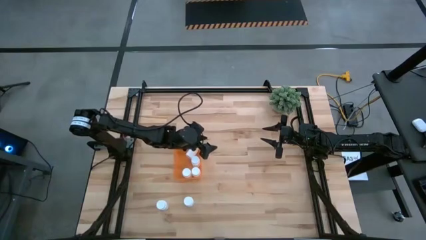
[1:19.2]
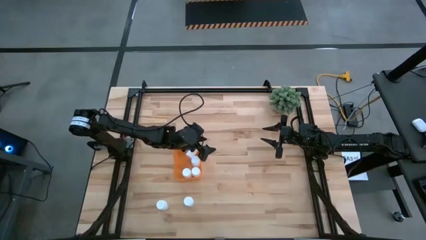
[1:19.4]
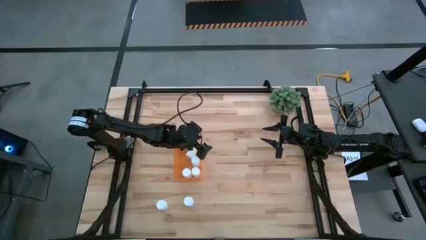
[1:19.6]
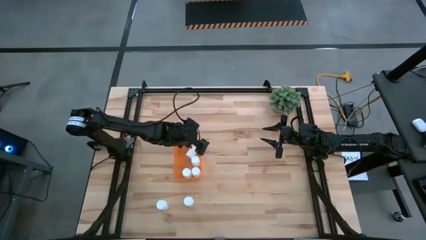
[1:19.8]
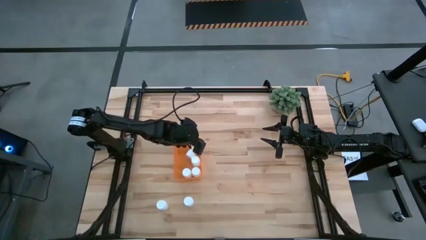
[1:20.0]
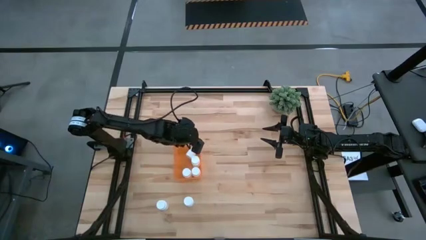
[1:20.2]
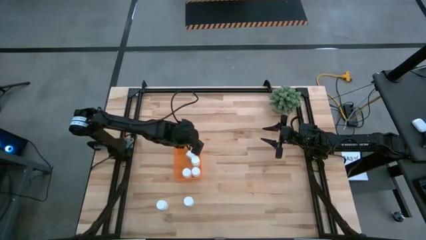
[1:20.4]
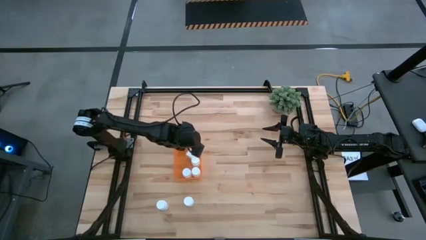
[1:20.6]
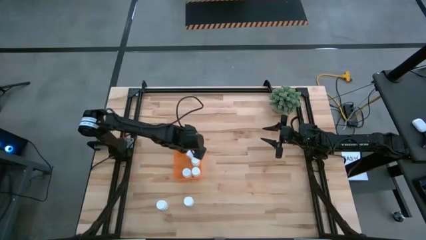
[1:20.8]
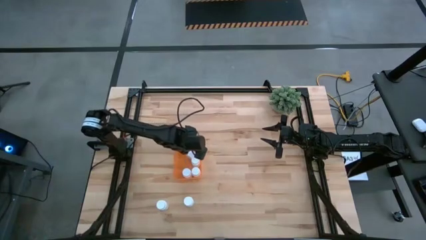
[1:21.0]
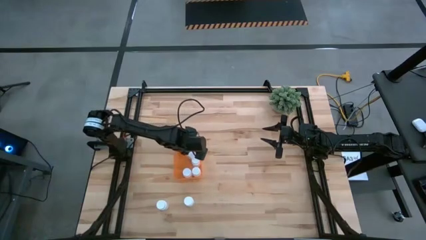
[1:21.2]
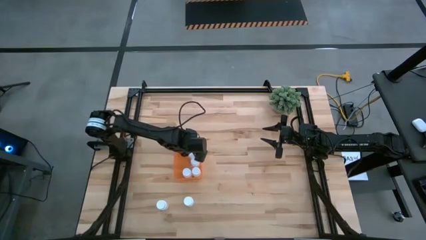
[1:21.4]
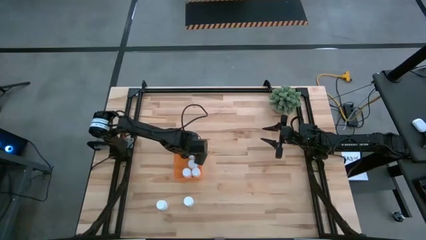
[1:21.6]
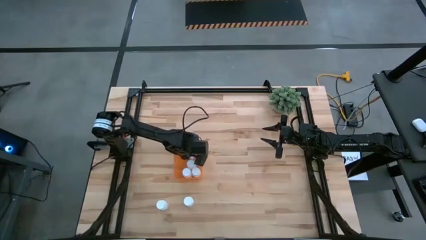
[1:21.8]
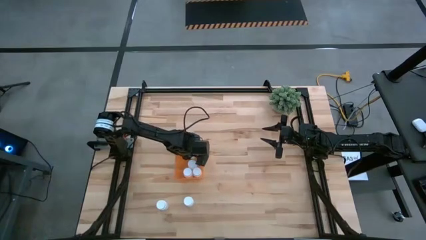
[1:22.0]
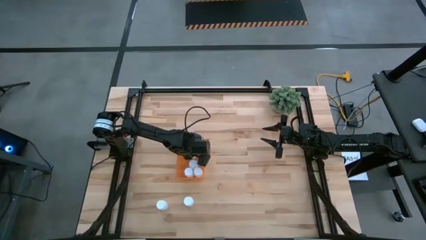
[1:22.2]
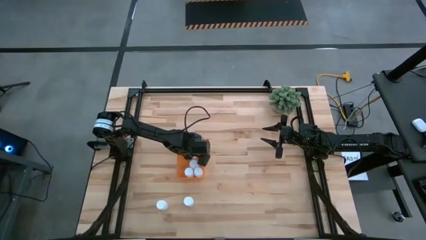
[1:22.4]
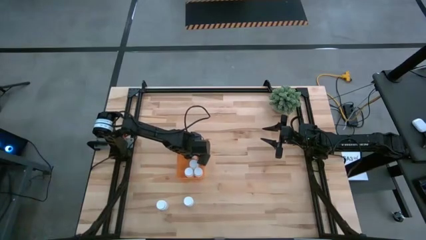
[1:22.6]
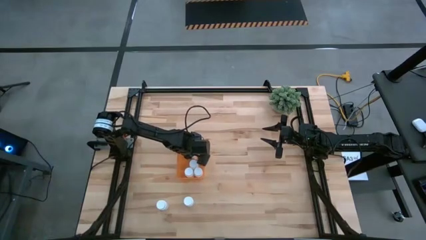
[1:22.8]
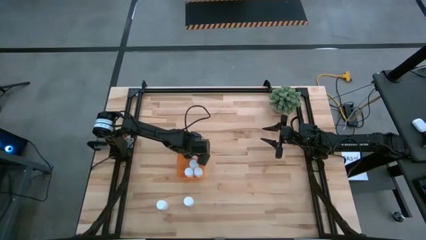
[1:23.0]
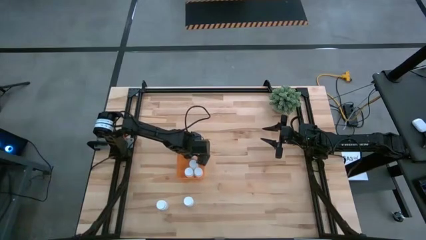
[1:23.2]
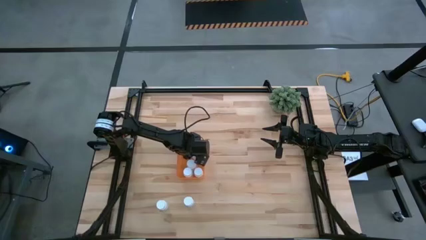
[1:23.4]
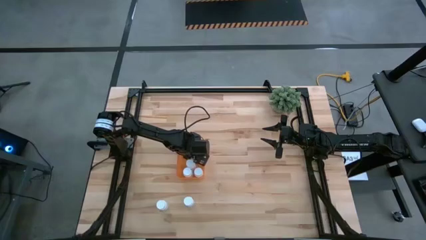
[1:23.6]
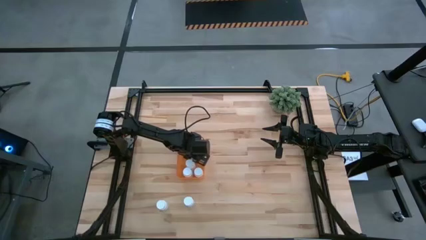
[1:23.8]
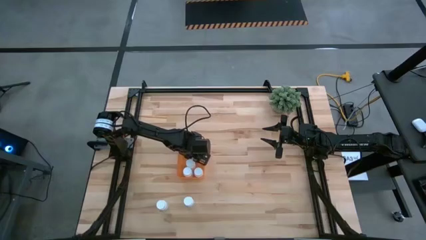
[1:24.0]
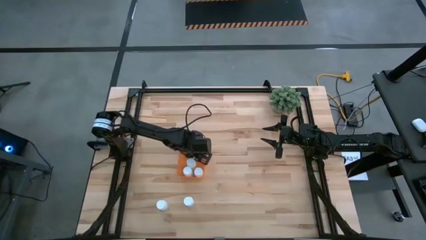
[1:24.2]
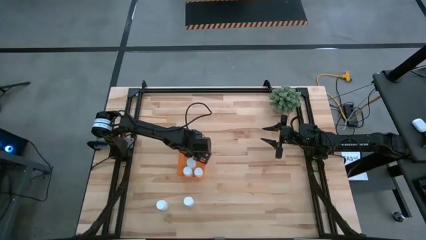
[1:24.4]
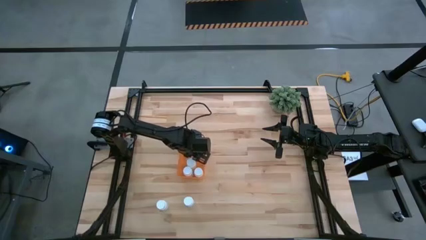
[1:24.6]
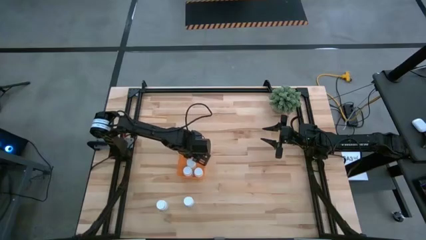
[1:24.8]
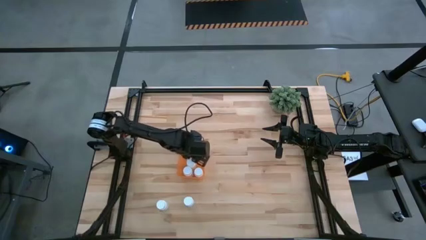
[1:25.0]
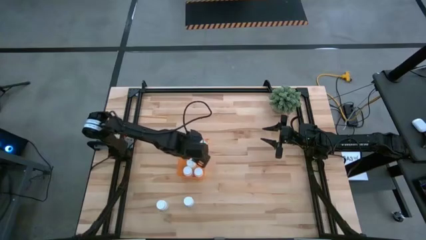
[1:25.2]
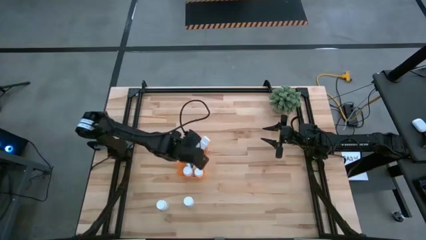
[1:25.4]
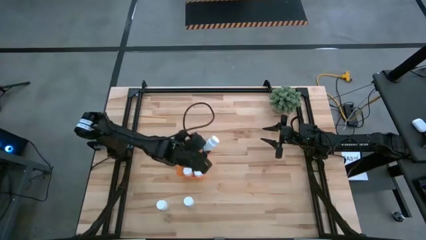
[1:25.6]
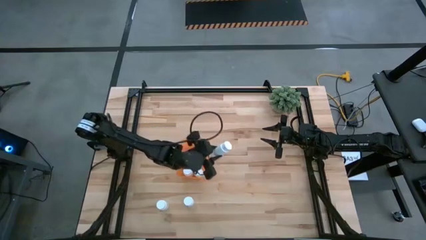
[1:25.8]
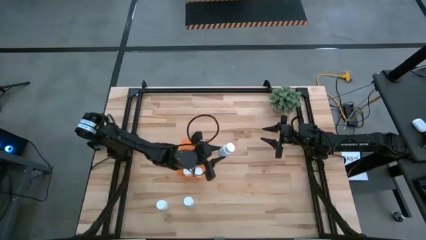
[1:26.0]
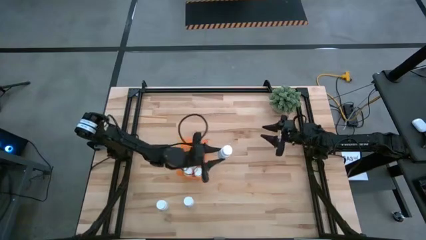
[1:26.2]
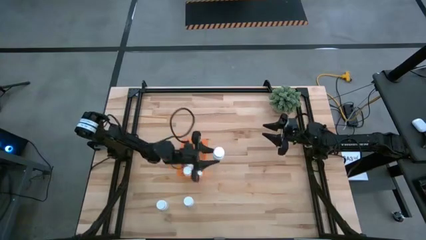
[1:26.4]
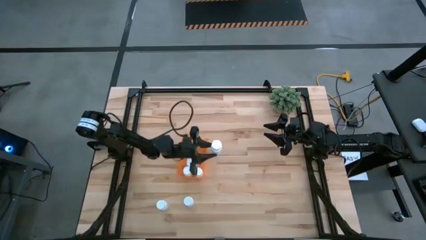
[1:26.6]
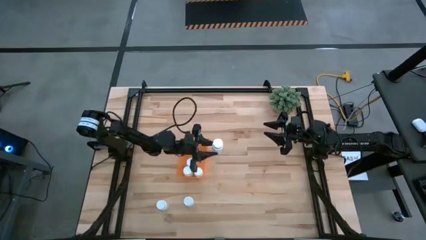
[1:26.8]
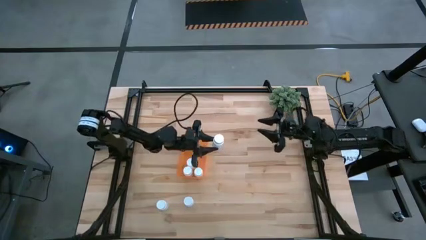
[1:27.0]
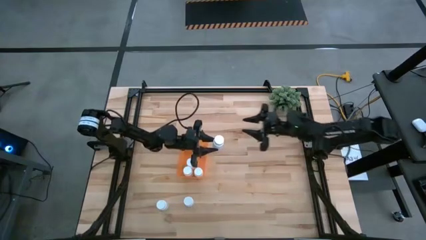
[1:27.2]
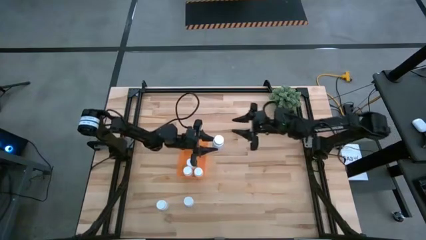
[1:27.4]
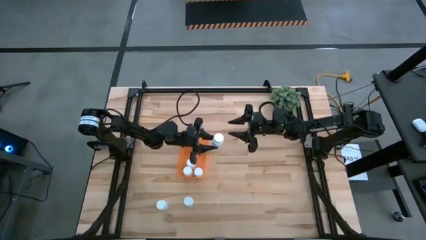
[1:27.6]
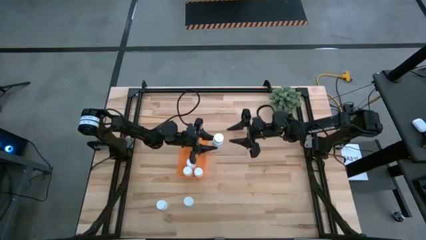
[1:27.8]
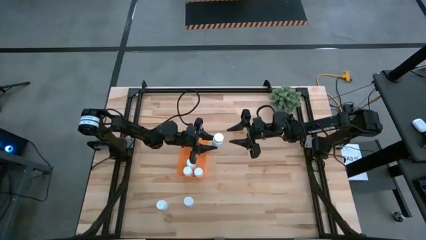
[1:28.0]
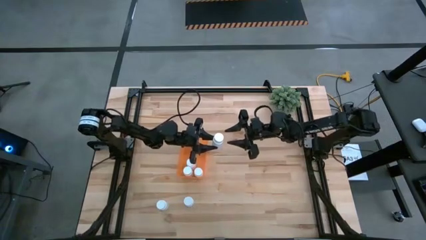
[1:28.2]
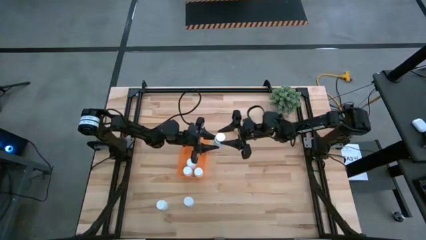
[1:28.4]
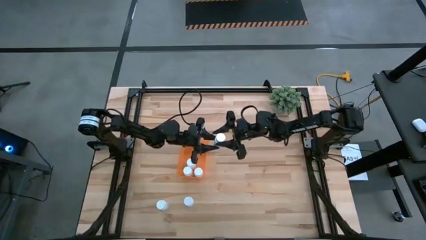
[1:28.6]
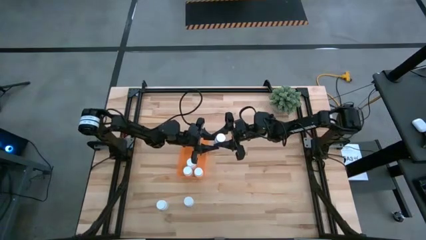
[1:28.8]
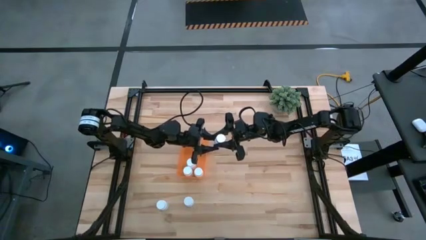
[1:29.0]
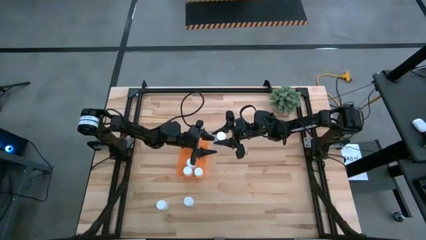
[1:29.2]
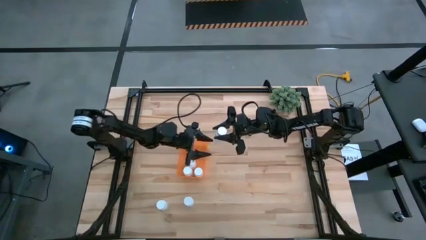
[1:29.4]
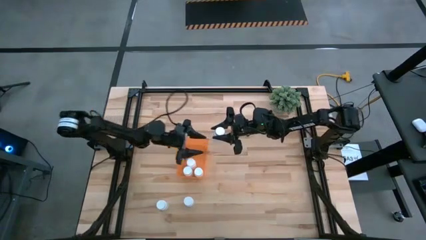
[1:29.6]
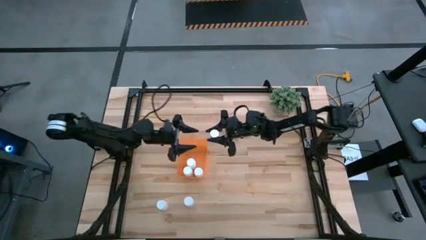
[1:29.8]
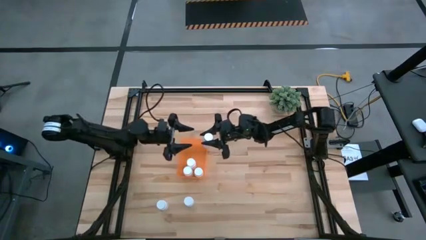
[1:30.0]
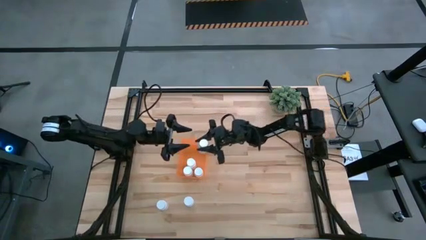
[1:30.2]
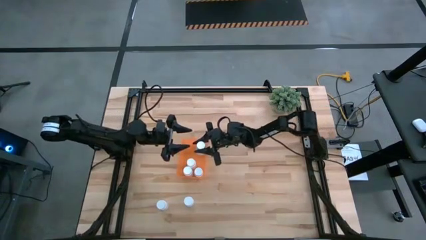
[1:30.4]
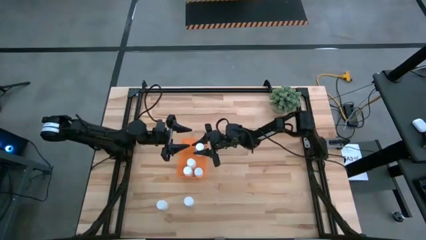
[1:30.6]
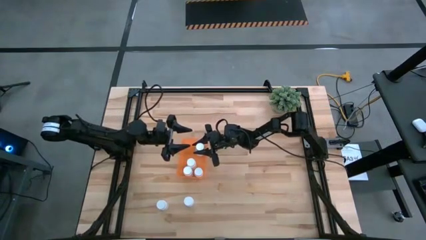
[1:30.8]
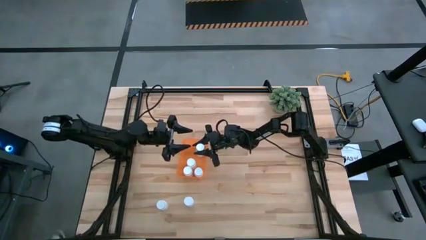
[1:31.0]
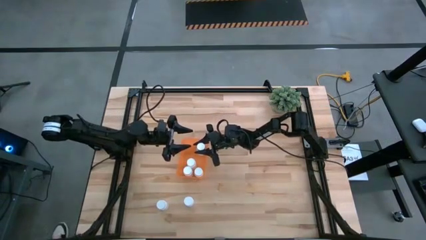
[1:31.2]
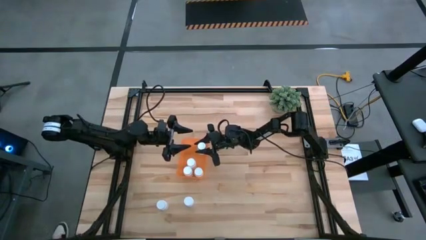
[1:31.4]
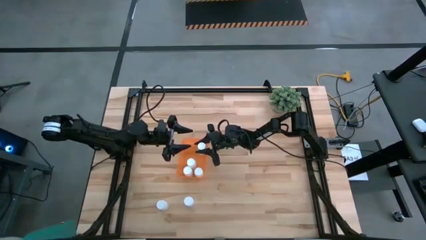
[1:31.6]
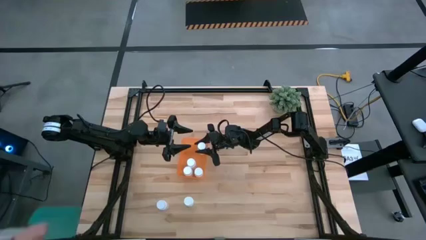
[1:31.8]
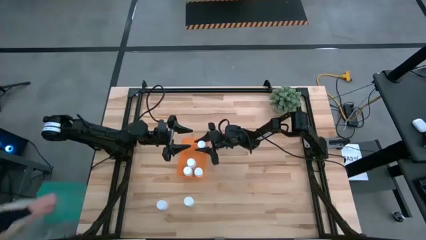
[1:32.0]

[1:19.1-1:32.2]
Task: Pick and place pill bottles into a basket
Put the top right white medicine bottle into the orange bin
